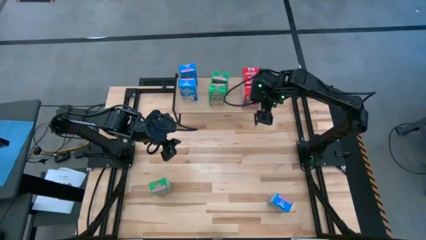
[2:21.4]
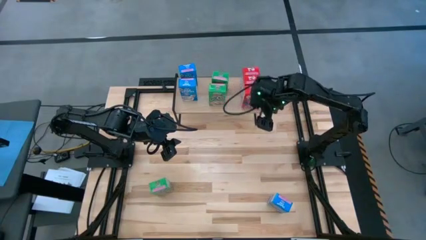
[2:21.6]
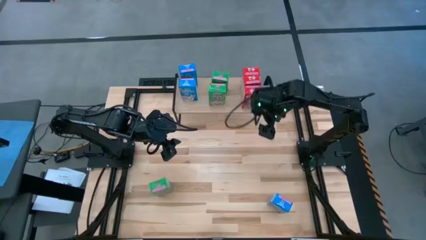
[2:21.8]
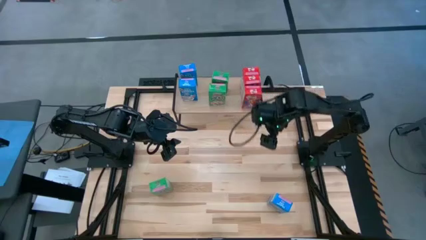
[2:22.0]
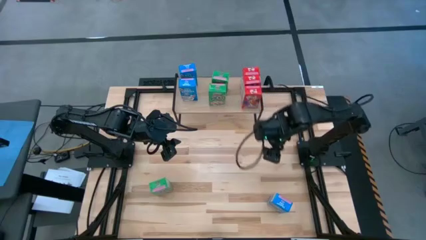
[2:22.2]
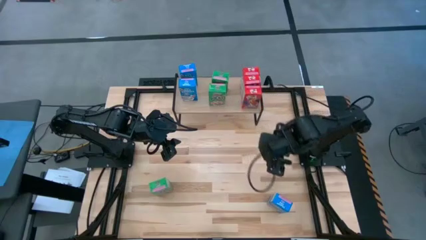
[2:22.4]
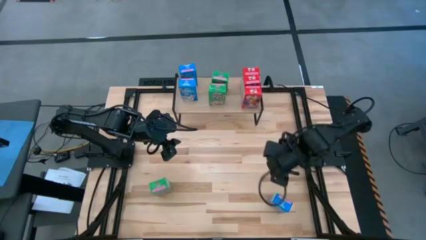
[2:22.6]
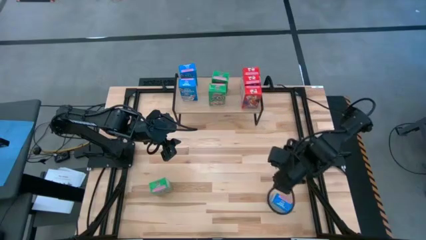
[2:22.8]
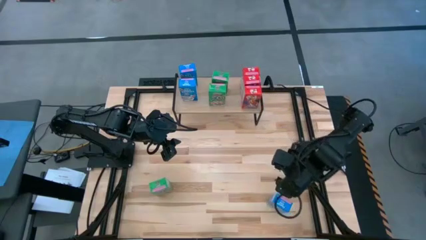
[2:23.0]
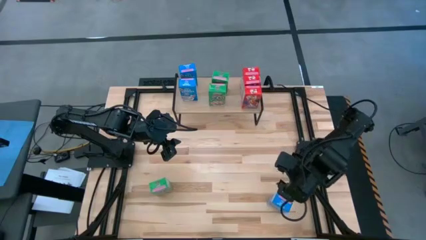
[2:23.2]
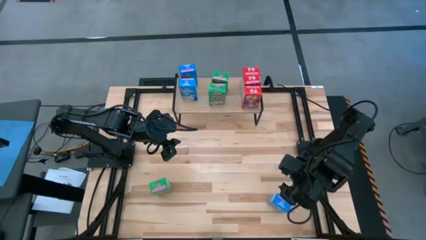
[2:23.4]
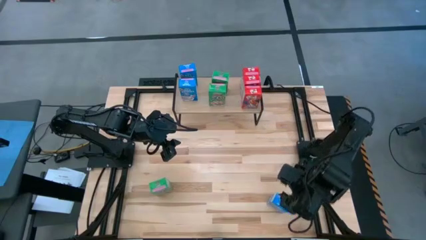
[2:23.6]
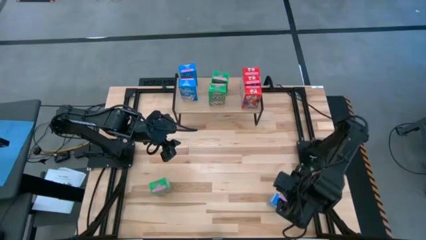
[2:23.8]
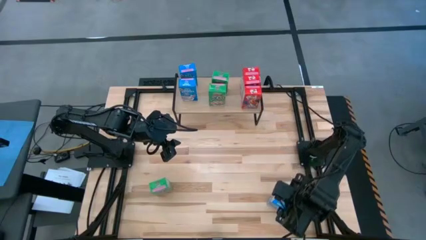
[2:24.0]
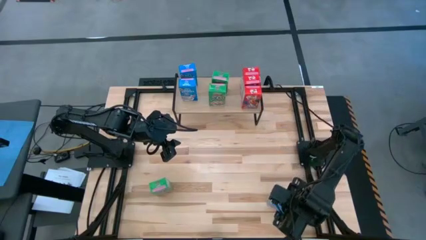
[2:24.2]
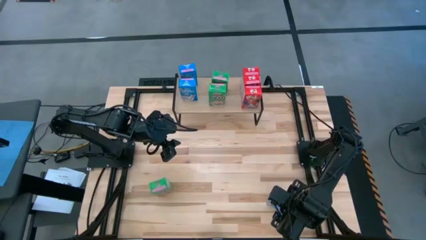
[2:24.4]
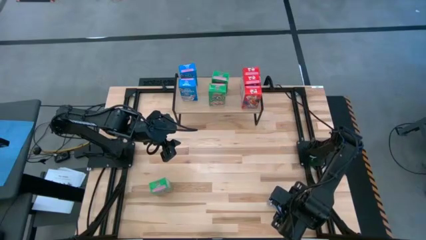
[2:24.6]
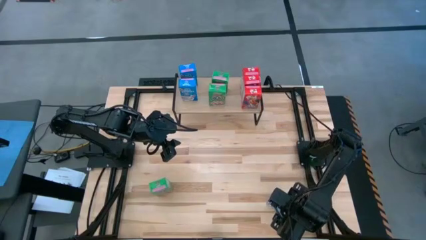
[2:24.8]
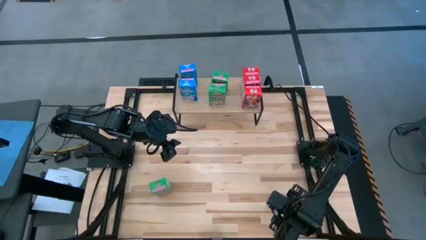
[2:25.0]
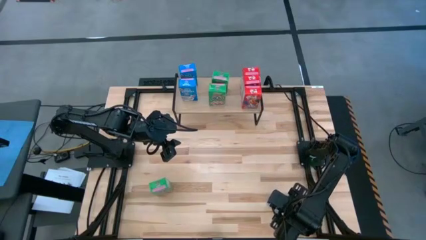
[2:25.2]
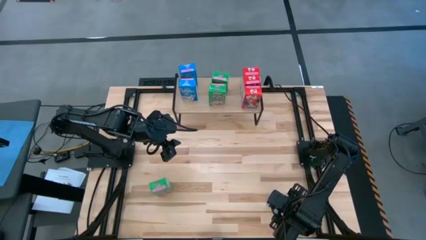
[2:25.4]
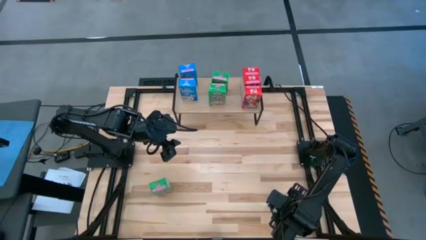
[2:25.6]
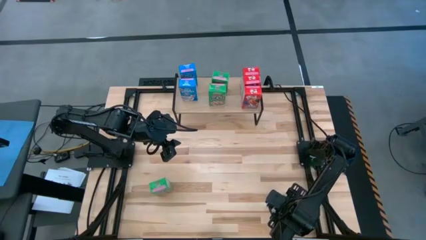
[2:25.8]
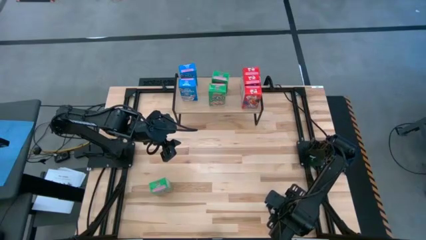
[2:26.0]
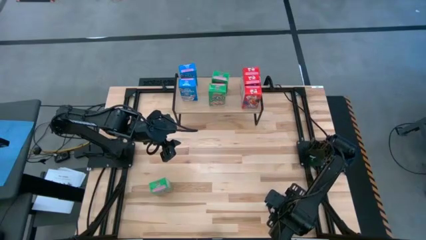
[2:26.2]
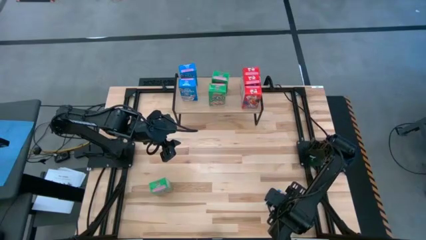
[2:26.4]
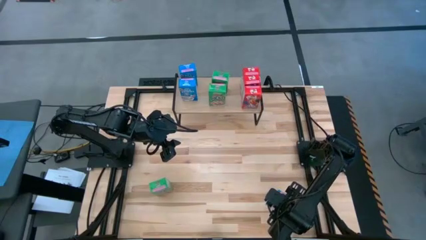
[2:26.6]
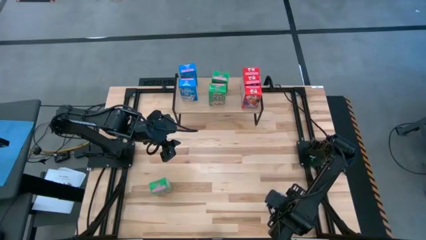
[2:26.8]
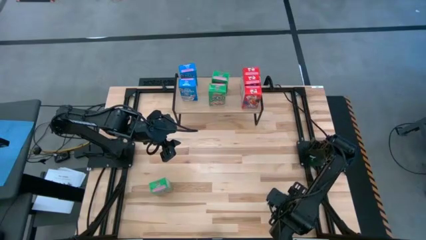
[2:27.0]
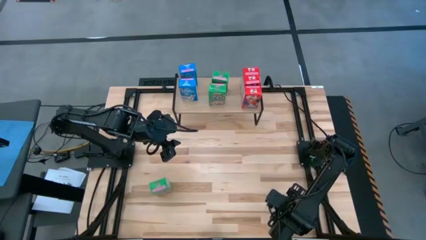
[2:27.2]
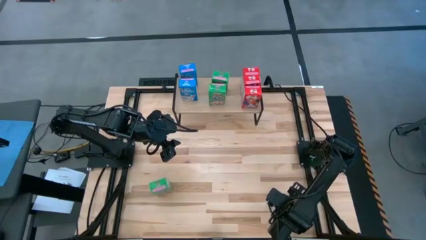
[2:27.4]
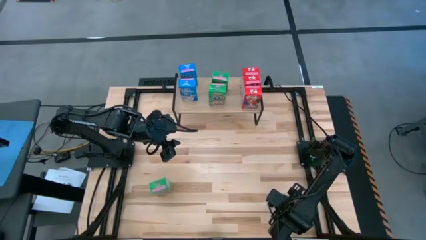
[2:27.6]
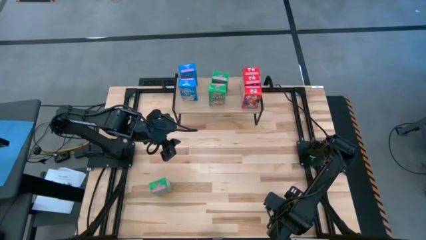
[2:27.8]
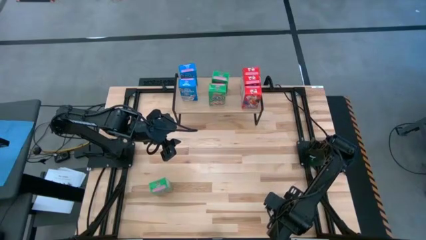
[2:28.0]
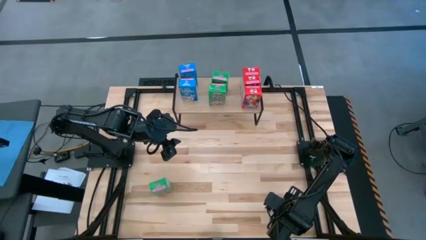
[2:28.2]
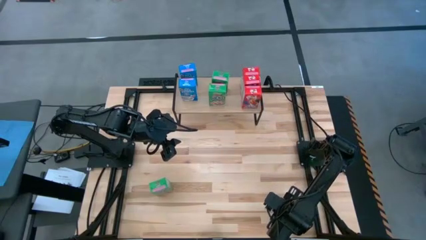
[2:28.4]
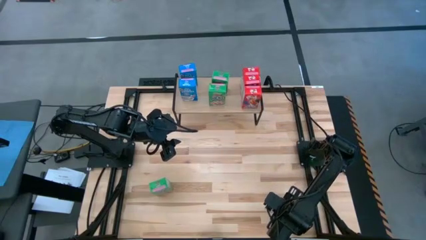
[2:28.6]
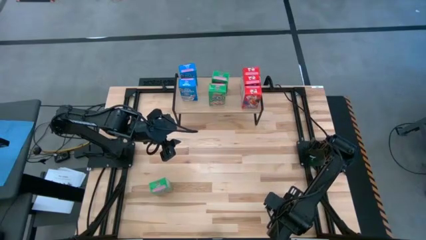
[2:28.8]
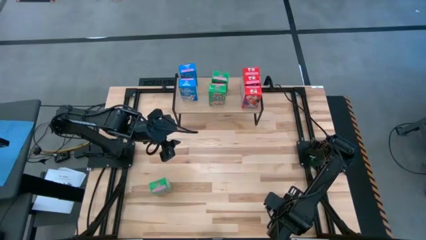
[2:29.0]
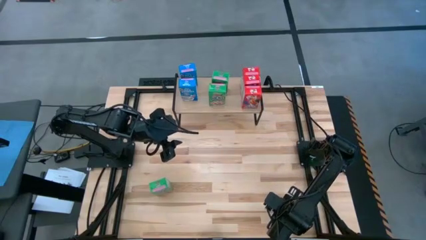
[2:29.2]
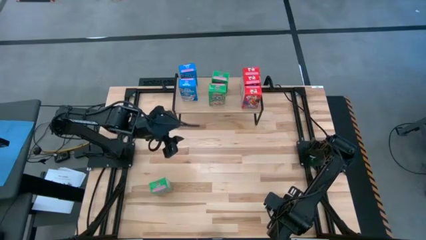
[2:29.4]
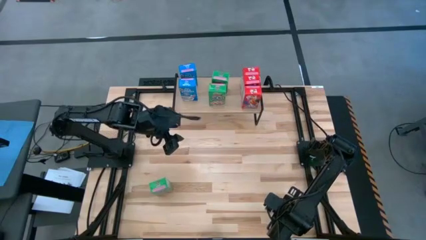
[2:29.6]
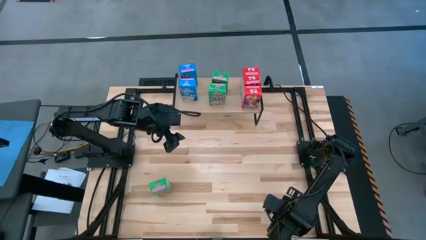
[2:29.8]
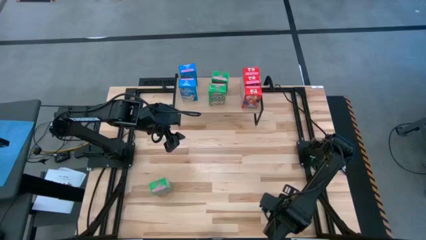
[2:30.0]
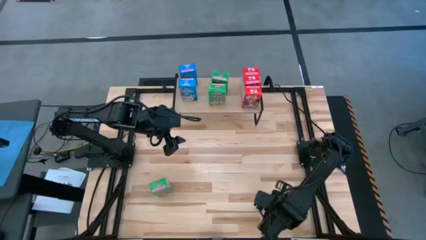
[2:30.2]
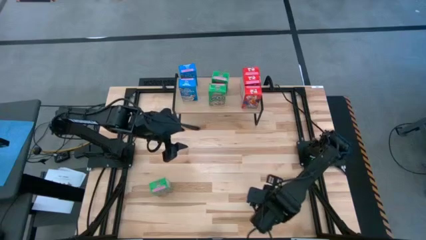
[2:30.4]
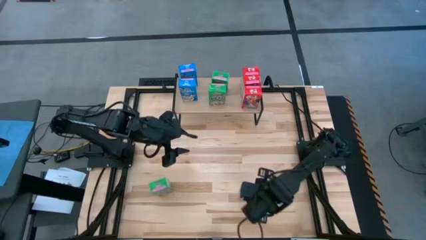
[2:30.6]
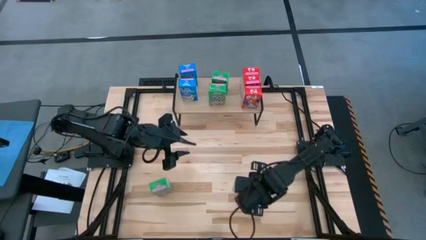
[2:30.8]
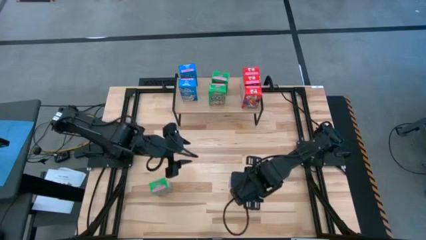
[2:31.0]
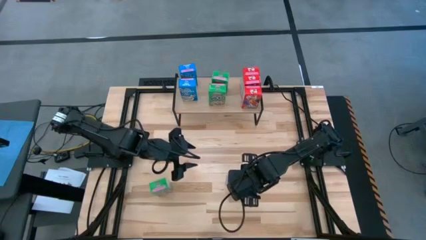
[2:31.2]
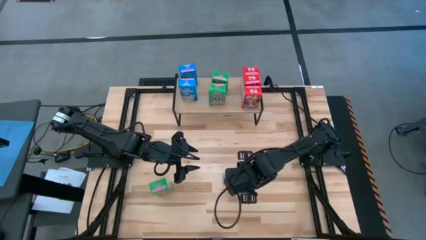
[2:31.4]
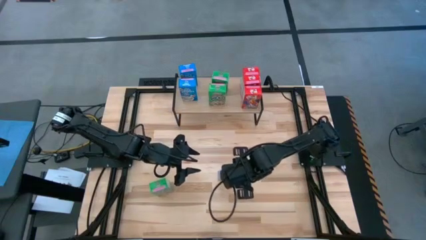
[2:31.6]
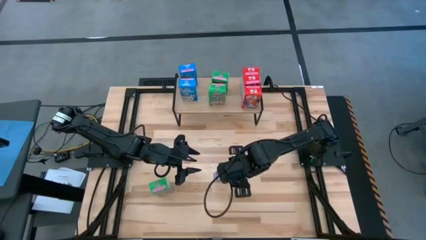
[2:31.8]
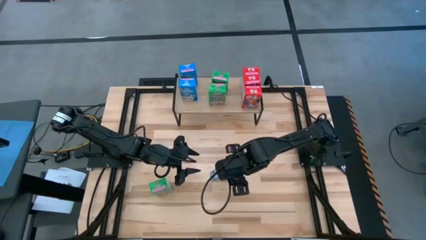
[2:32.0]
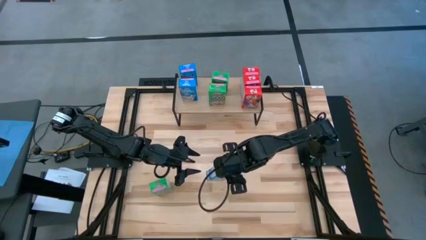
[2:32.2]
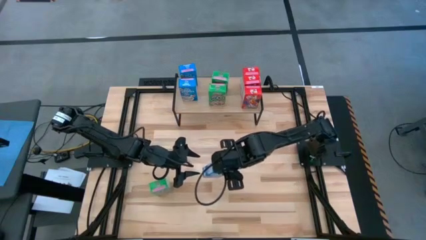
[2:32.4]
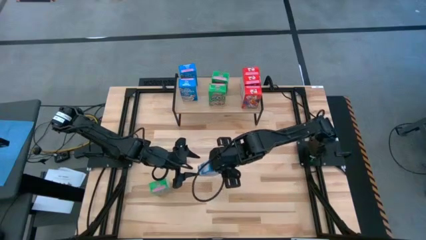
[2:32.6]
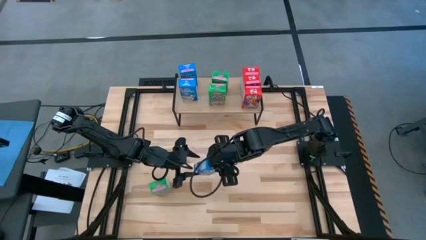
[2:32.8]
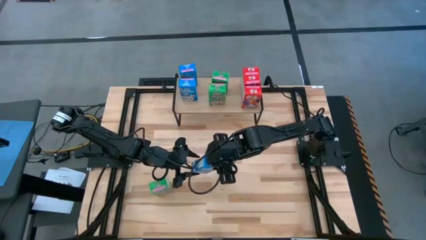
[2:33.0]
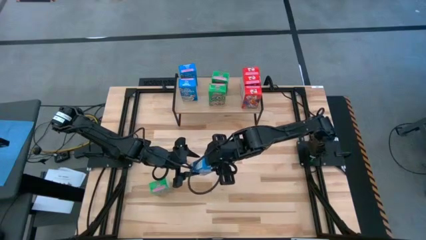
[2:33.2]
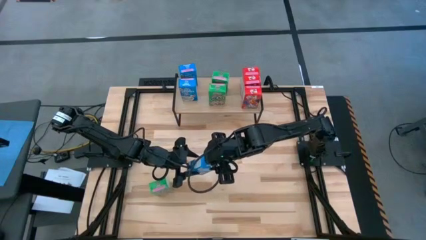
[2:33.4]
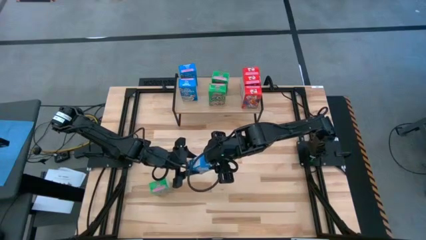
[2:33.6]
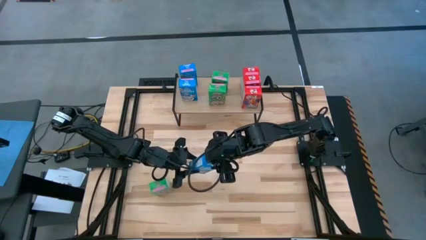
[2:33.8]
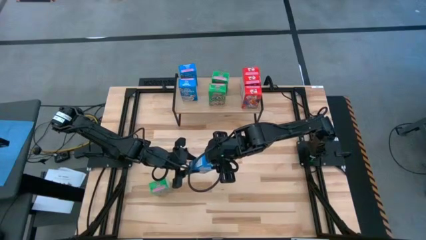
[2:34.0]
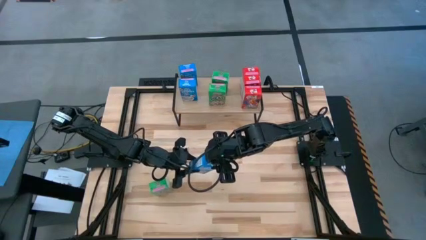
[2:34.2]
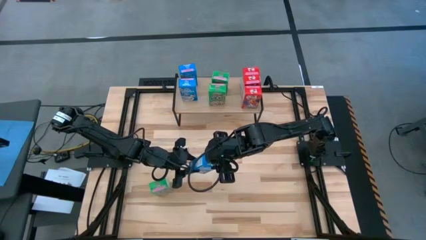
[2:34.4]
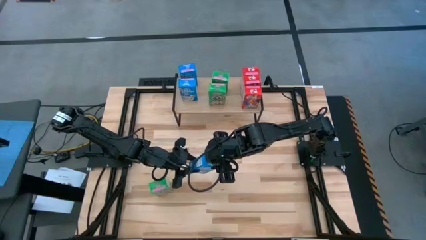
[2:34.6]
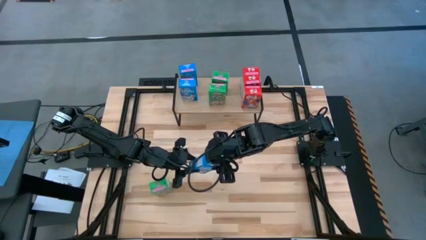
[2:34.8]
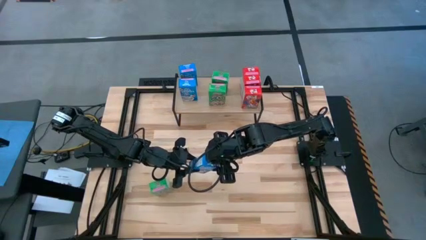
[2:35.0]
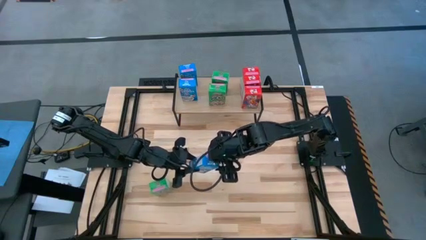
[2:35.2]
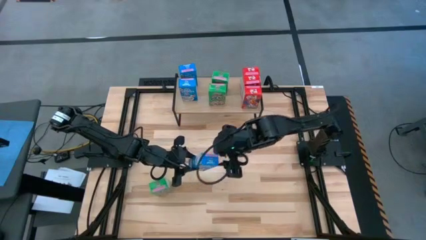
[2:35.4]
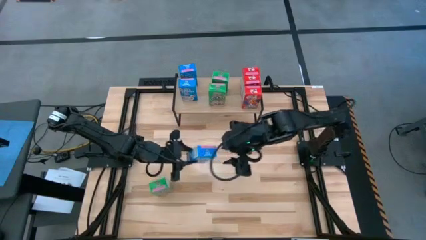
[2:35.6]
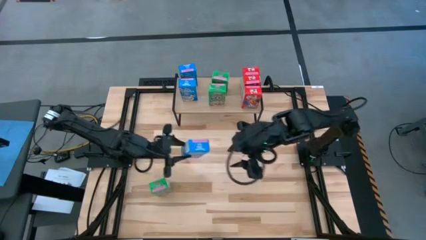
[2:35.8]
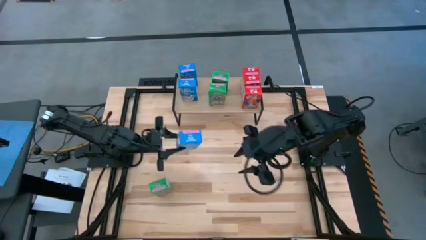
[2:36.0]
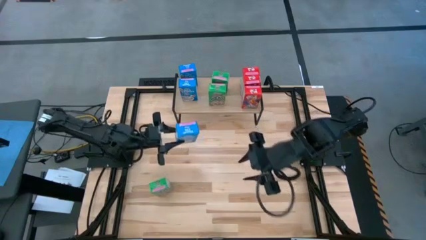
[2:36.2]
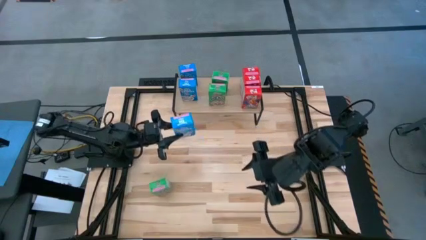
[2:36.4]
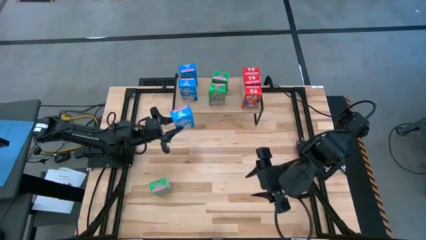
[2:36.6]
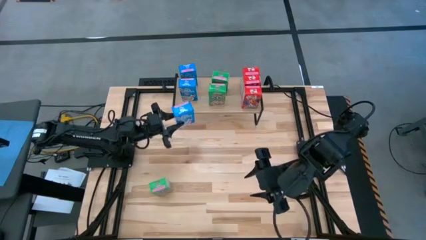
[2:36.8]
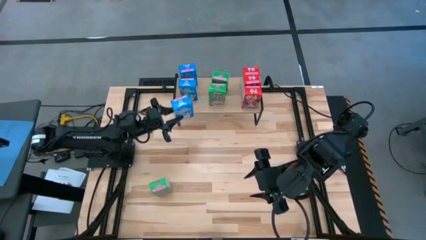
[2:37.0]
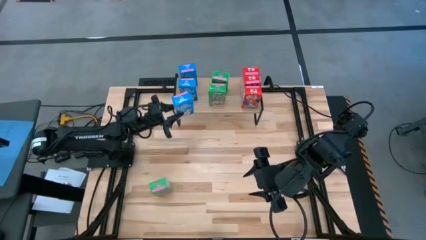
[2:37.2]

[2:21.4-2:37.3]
Task: Stack cereal on shelf
Put the blue cereal box on the shelf aligned with the other blue cereal boxes
